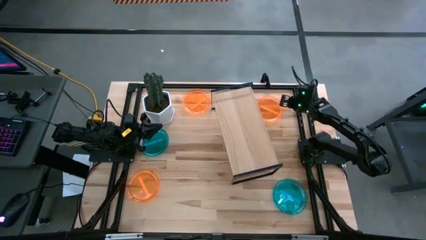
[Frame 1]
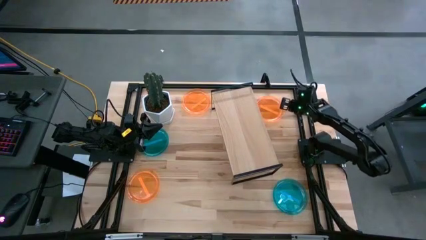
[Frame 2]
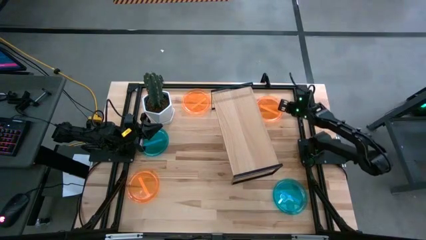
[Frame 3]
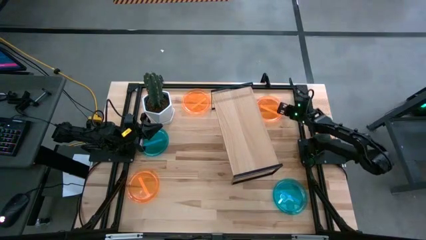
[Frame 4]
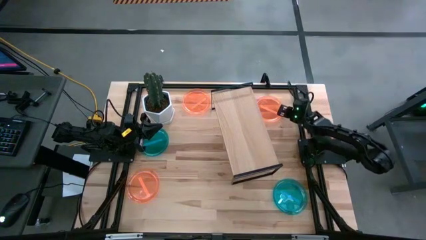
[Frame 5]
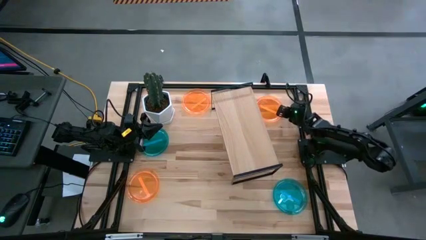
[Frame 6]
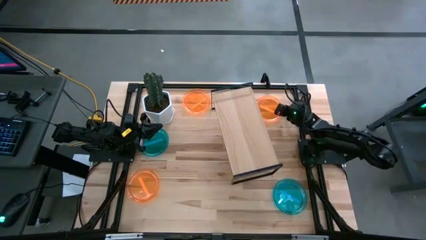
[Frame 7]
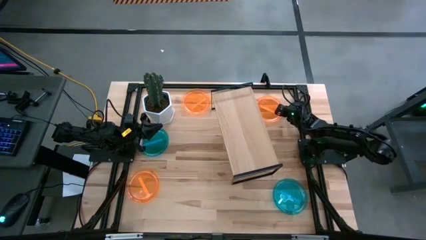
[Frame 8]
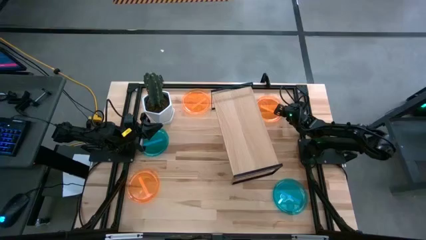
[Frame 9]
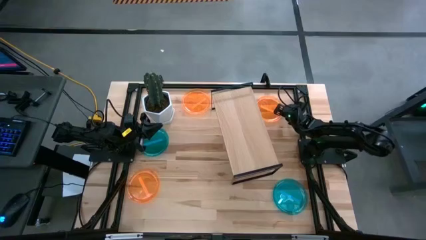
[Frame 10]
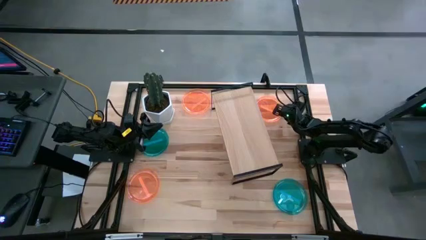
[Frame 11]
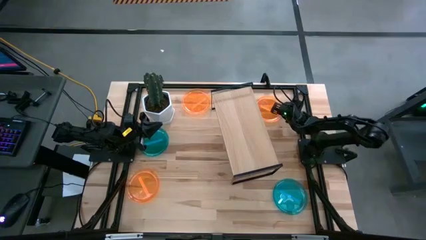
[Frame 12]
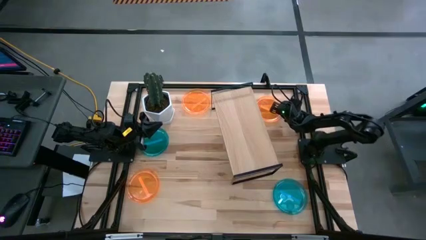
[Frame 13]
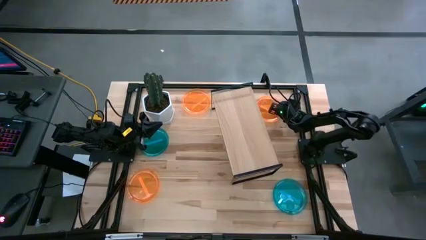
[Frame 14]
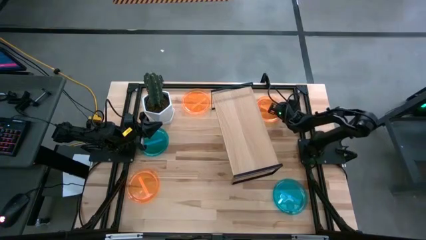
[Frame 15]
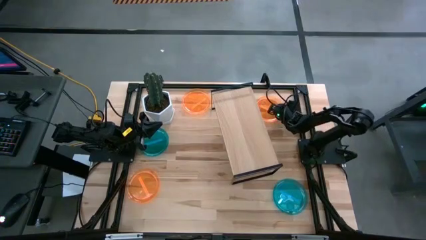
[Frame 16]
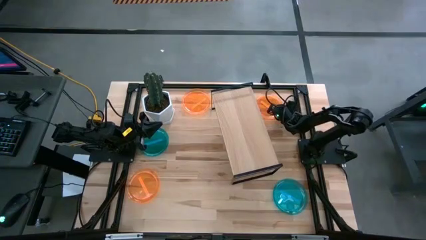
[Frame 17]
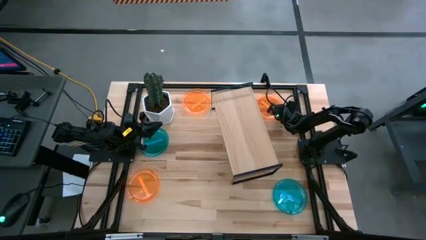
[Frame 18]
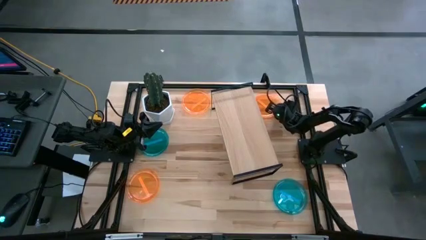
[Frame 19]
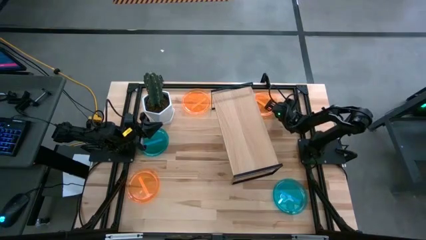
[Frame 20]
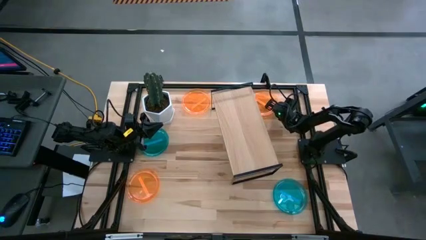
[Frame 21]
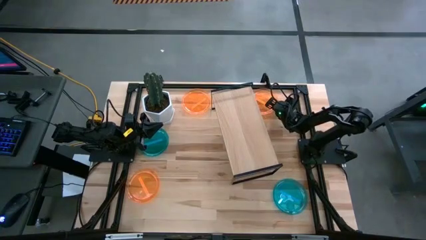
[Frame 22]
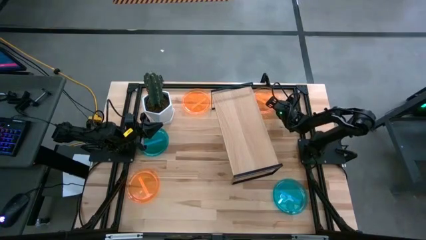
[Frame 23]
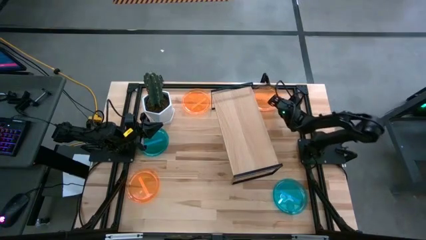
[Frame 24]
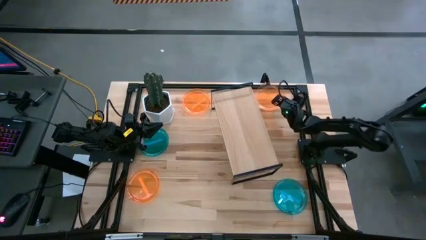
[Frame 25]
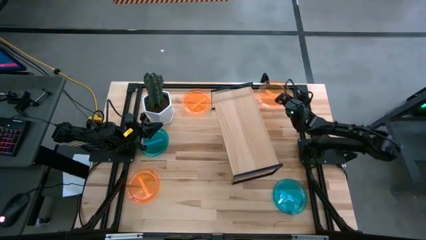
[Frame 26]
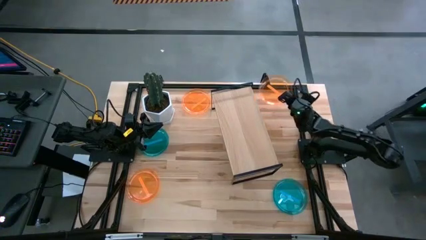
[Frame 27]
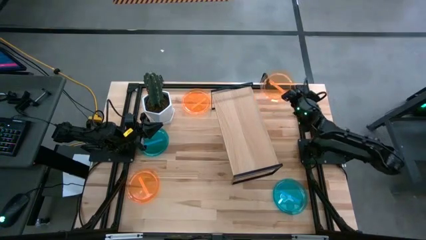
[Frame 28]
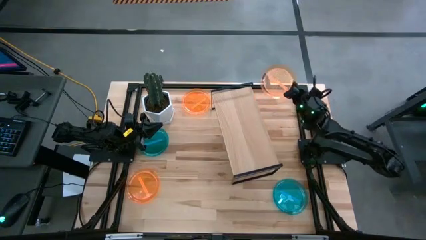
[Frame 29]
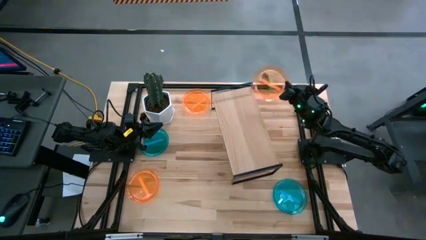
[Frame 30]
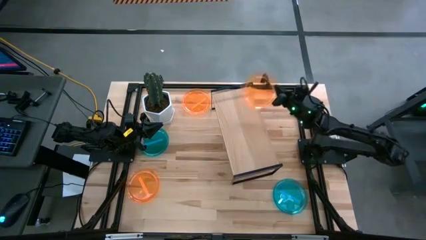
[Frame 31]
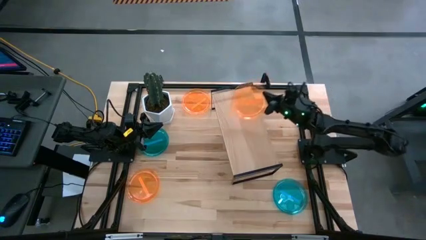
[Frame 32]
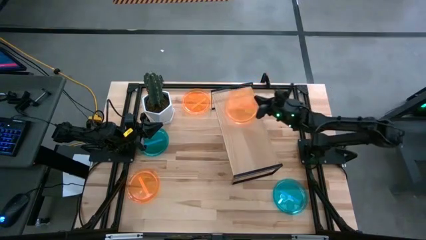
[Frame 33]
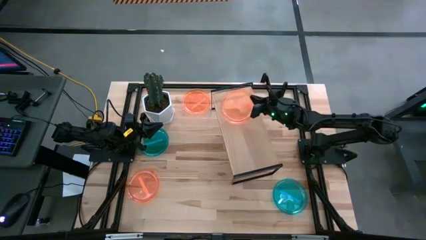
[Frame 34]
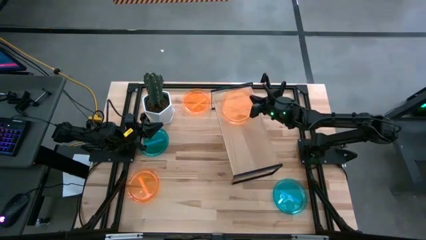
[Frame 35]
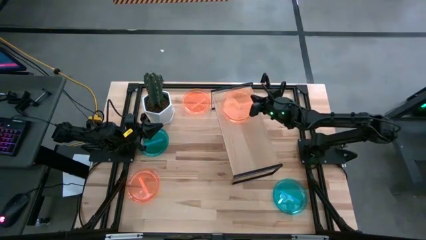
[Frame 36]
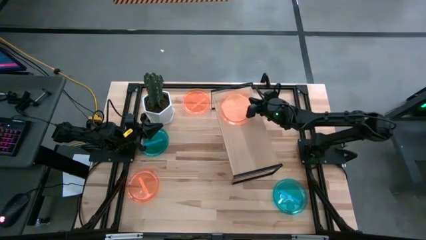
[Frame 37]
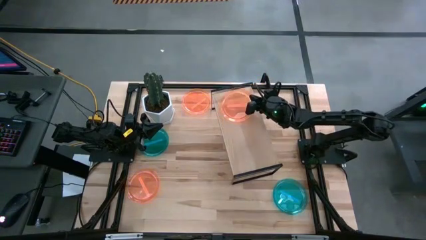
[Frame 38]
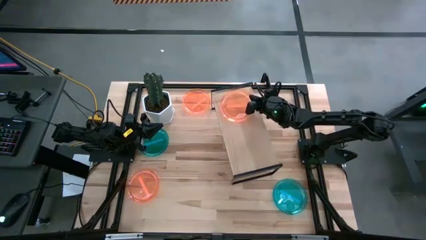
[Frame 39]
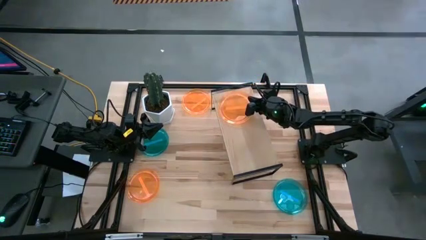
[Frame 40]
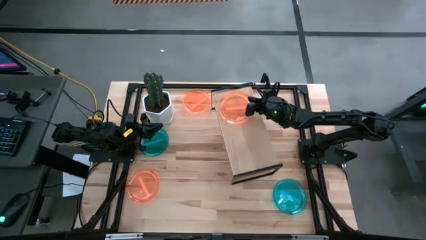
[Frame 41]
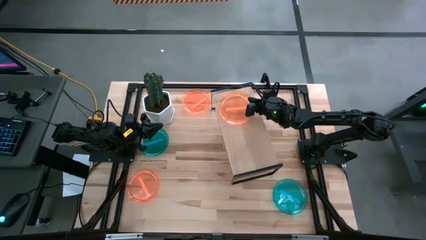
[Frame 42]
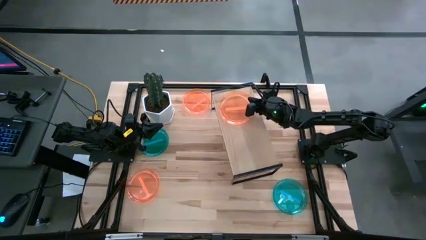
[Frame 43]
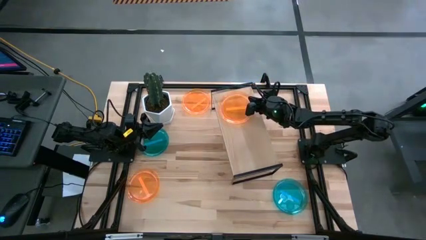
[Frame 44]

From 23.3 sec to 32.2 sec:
Task: Place and stack plates onto a shelf
Put the top right orange plate on the shelf

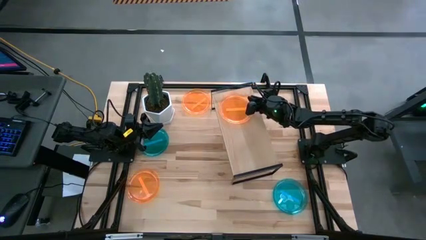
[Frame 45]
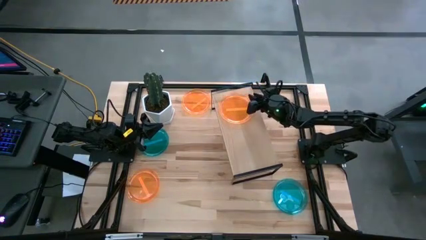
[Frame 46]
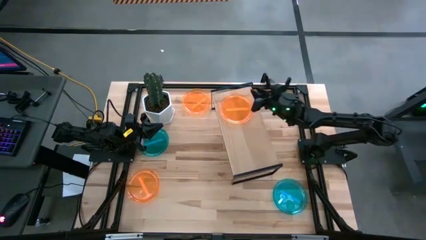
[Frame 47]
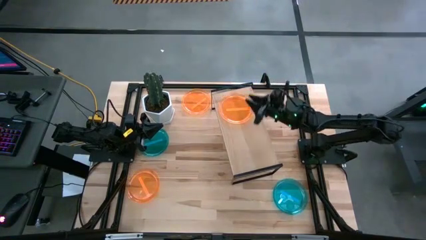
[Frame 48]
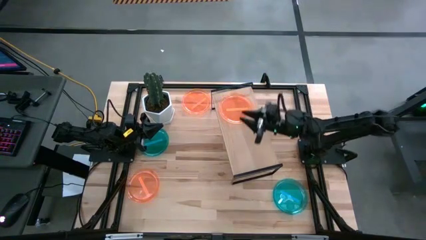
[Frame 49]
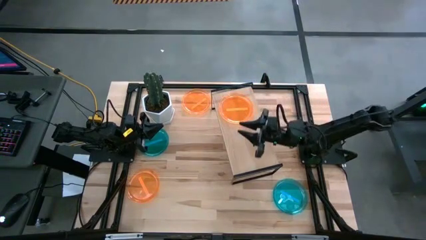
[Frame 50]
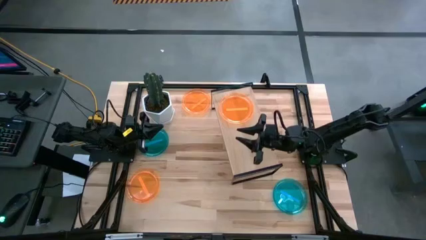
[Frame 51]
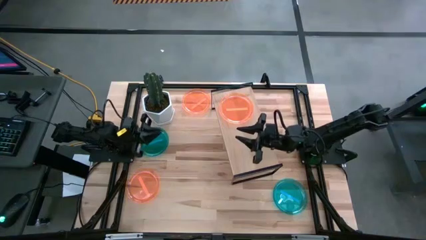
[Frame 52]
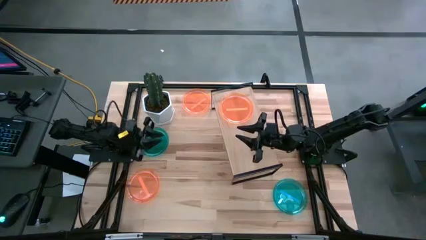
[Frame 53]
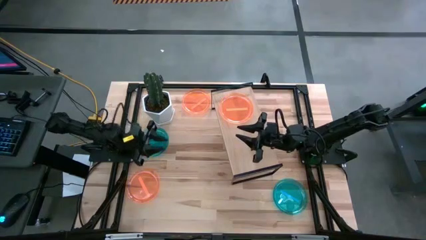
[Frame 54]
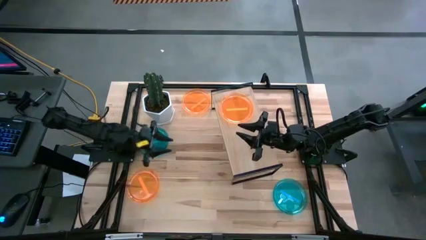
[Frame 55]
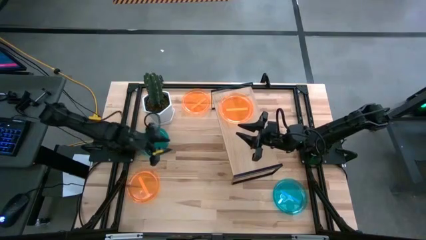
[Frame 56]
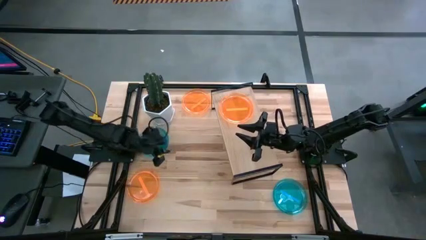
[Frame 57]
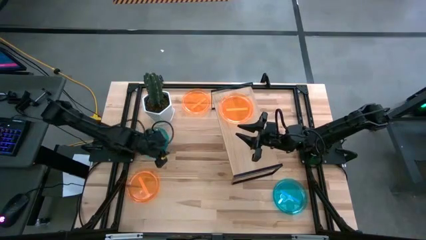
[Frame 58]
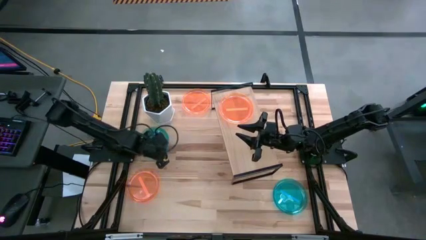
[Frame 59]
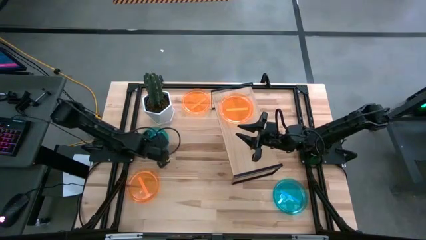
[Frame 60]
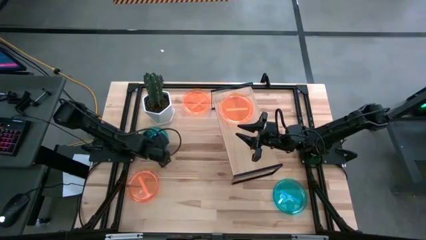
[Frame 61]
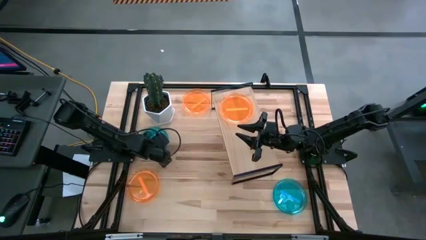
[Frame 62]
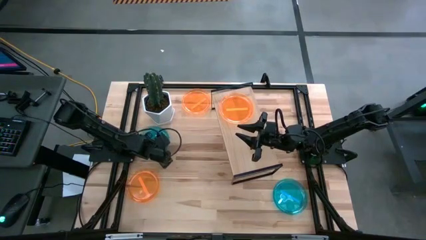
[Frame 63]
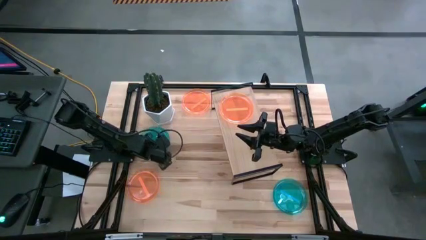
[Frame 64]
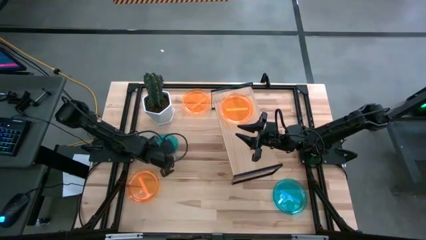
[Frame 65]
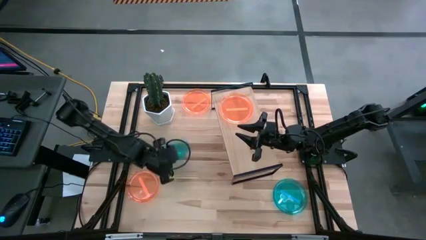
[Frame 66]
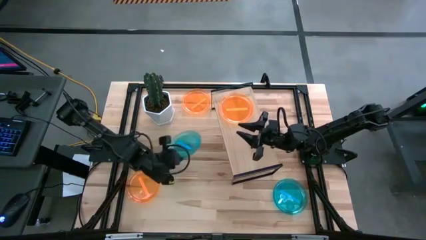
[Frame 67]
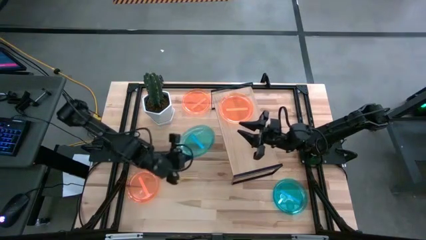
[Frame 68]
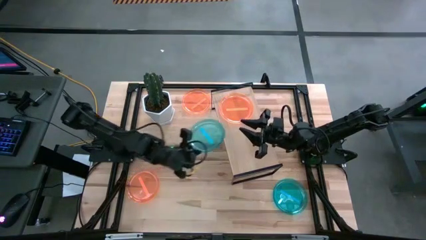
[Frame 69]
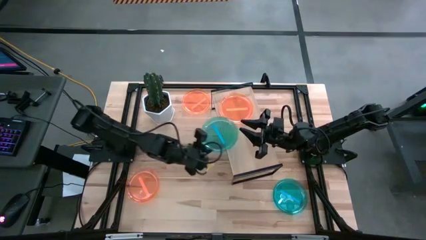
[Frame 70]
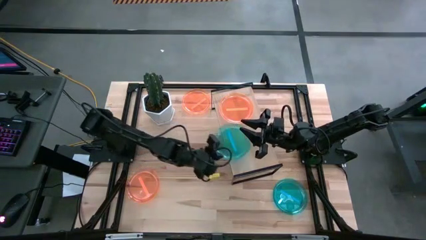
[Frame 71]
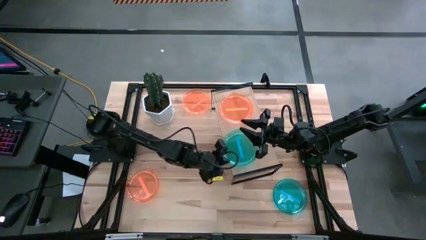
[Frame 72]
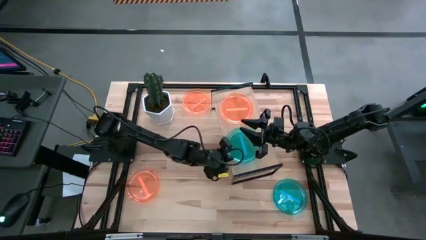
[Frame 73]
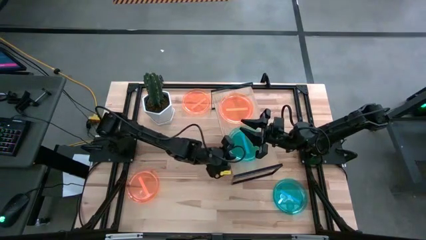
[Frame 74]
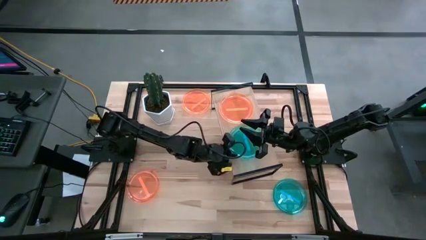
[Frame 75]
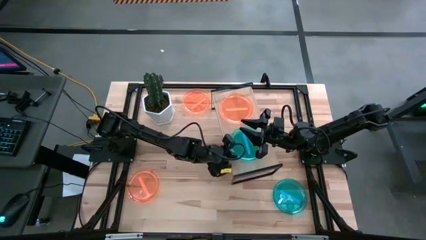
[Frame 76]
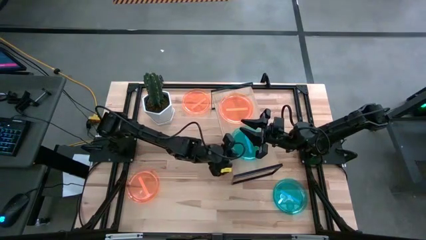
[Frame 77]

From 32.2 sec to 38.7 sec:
Put the left blue plate on the shelf
